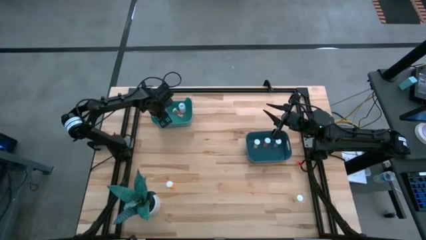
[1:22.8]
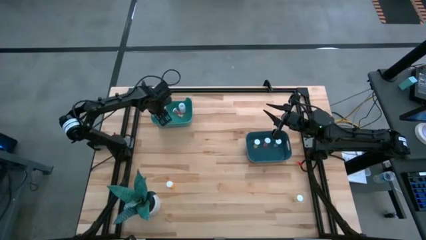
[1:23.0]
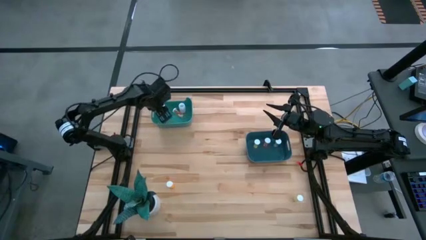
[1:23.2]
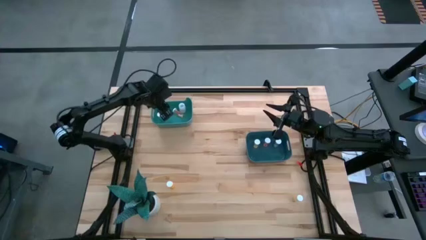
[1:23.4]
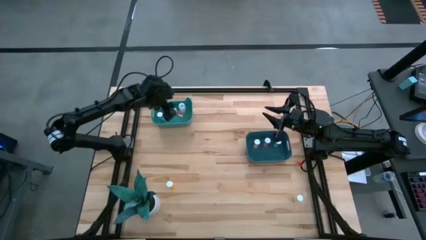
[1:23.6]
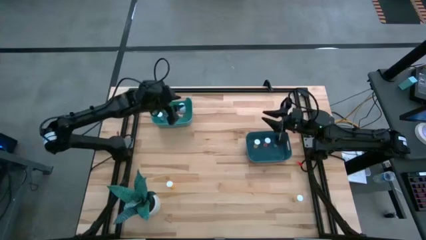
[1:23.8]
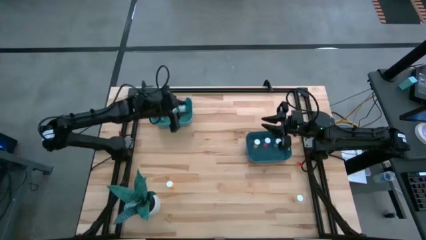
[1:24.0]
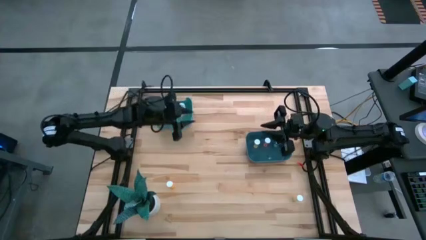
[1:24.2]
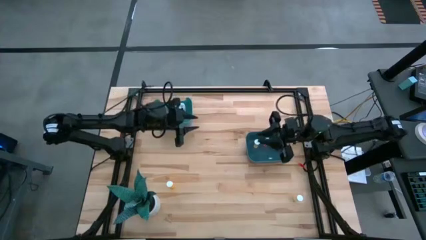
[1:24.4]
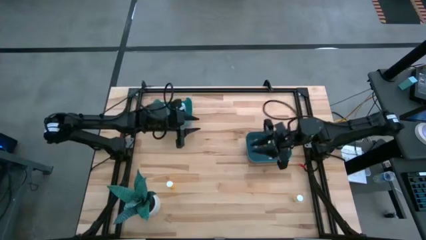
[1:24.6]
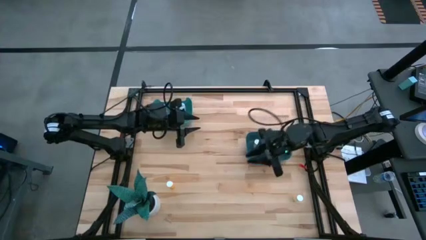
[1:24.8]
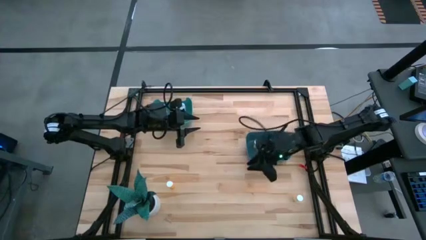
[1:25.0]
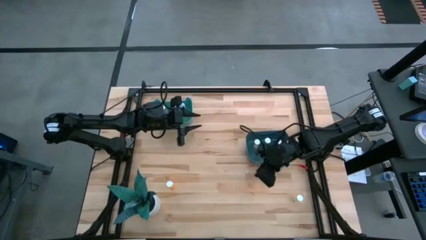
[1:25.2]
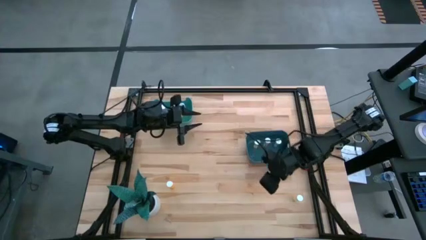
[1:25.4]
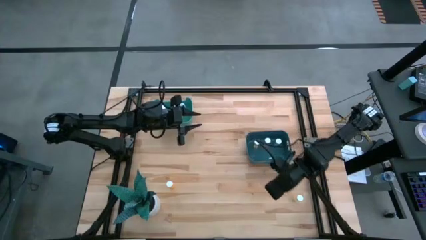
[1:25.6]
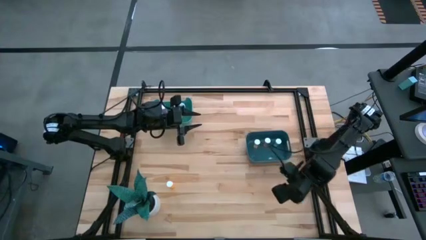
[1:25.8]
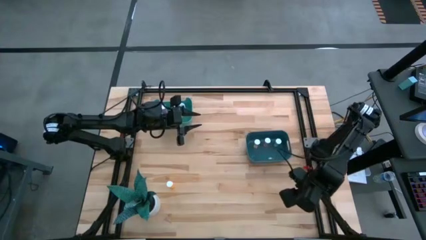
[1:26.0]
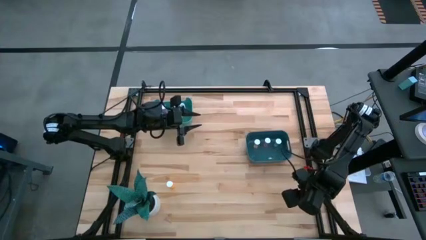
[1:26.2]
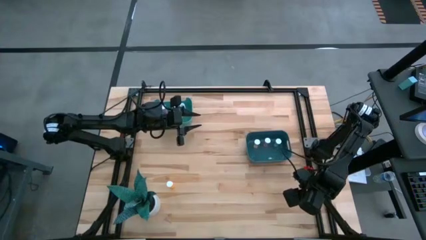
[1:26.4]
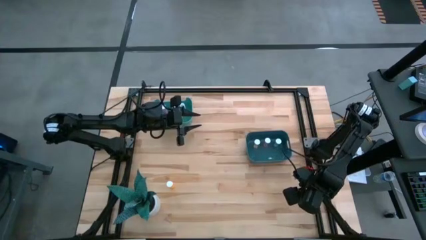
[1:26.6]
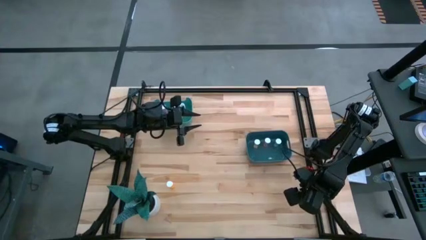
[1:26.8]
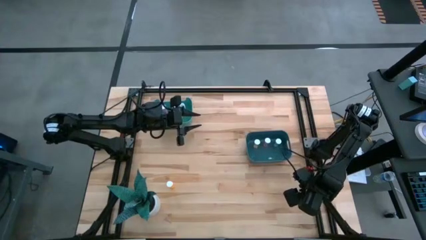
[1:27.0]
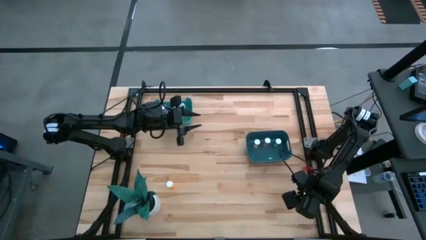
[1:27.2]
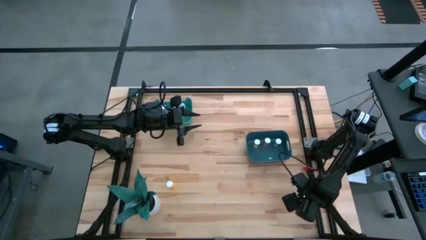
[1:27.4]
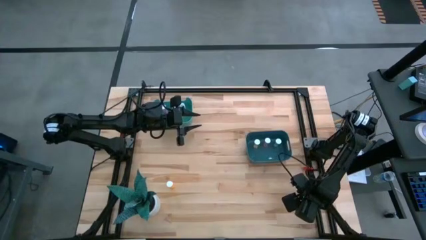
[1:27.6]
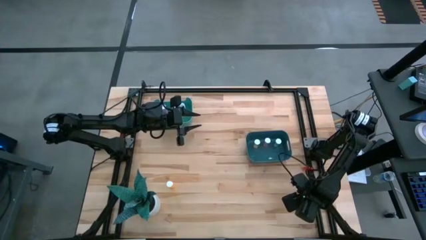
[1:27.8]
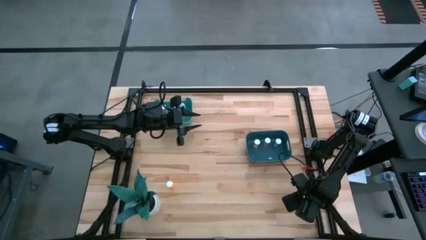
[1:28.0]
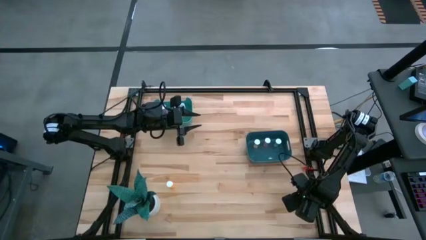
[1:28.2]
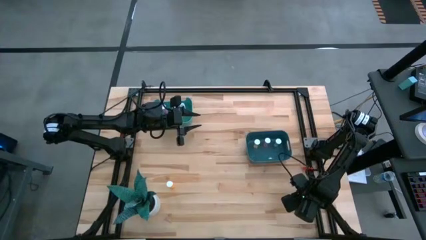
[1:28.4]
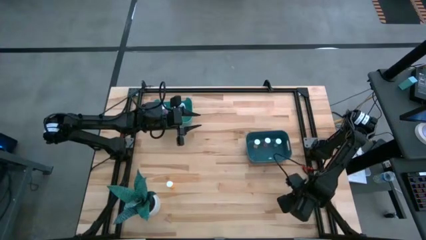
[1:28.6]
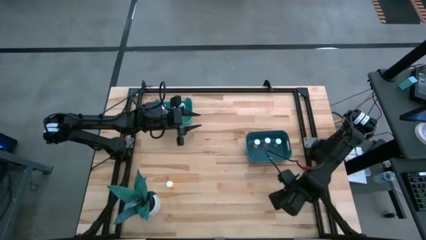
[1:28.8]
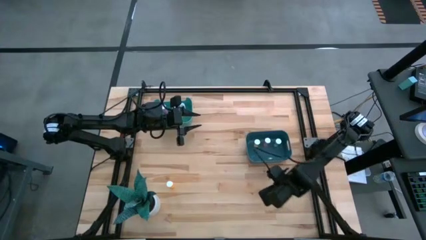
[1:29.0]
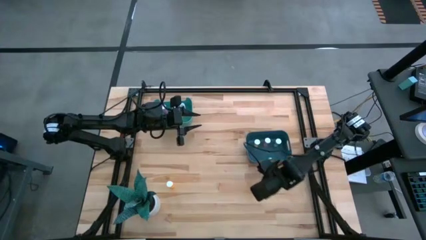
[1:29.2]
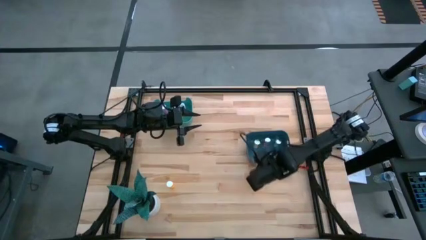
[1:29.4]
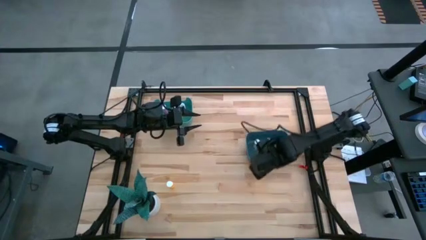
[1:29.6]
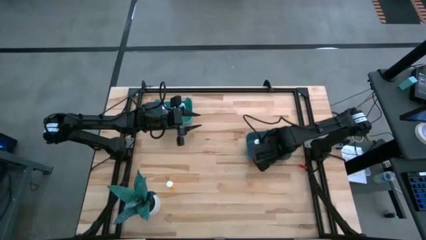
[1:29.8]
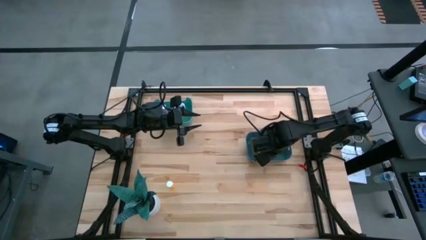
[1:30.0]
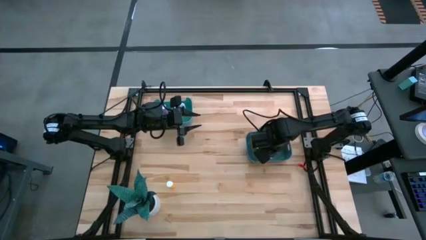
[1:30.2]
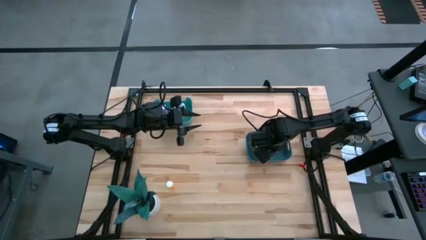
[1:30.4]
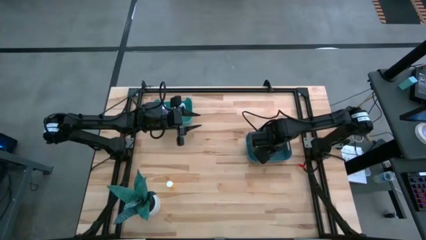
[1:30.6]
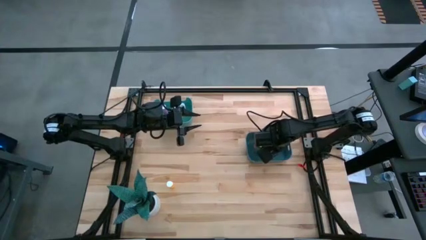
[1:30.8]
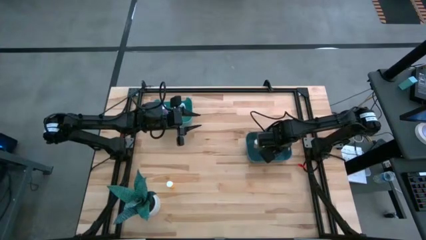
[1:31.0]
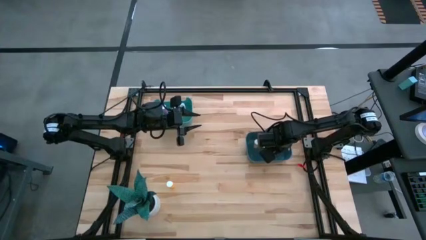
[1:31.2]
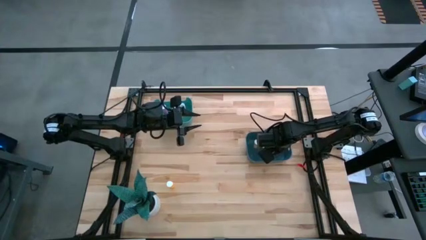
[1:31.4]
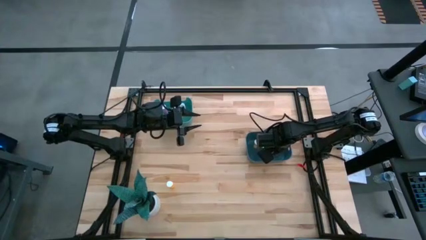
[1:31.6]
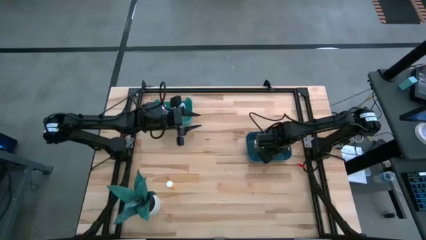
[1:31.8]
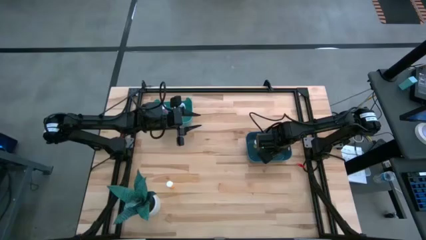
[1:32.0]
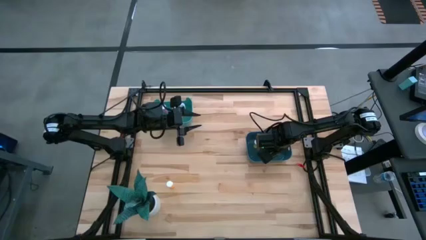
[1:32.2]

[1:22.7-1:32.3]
Task: Pick and place medicine bottles into bin by pill shape (circle, oval)
Put the yellow tablet bottle into the blue bin

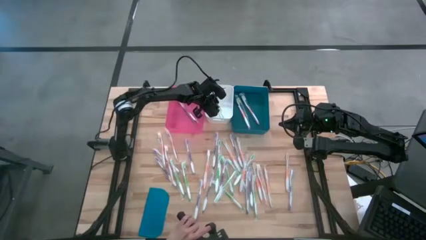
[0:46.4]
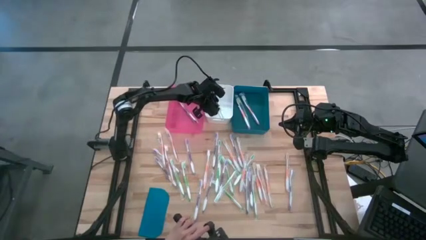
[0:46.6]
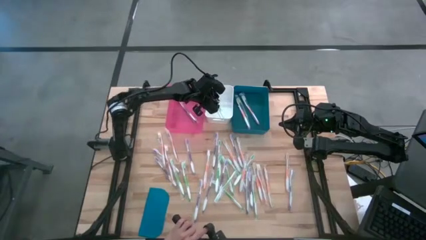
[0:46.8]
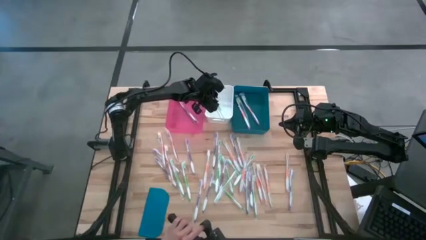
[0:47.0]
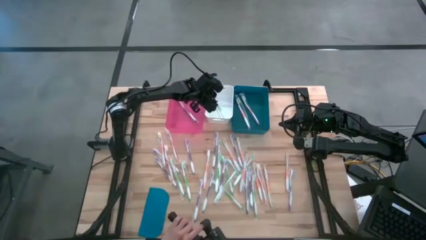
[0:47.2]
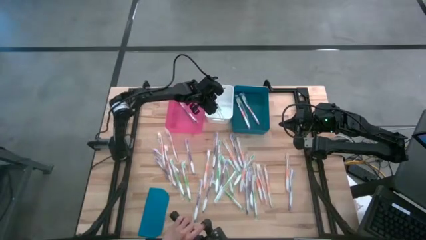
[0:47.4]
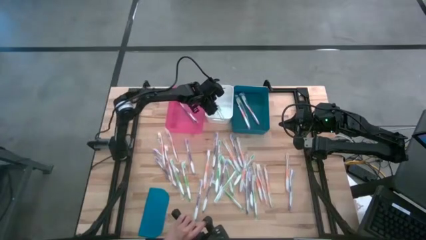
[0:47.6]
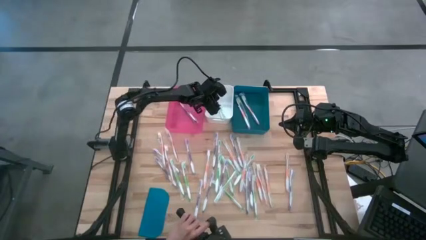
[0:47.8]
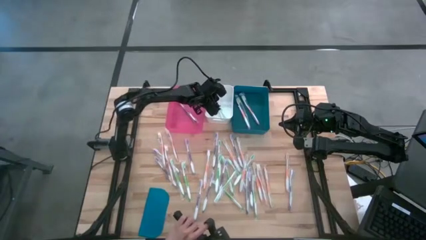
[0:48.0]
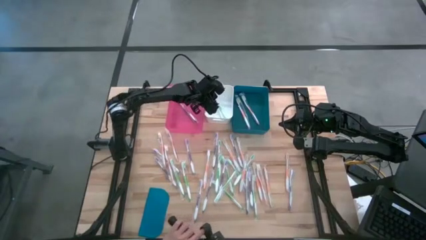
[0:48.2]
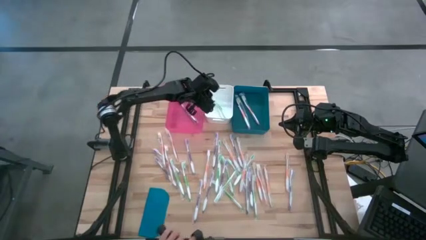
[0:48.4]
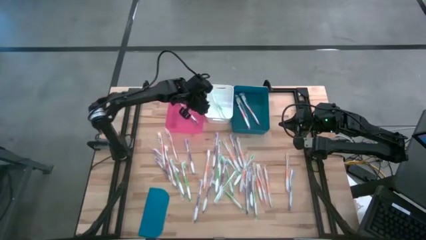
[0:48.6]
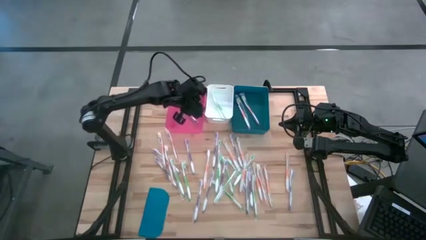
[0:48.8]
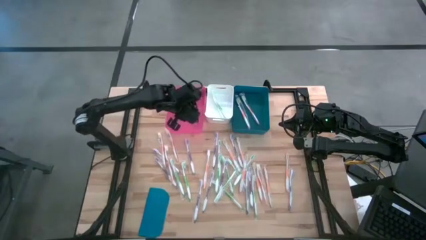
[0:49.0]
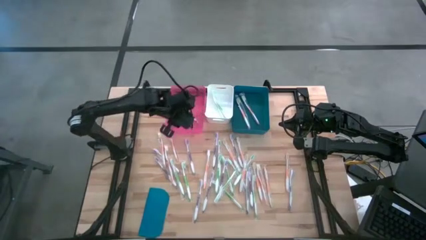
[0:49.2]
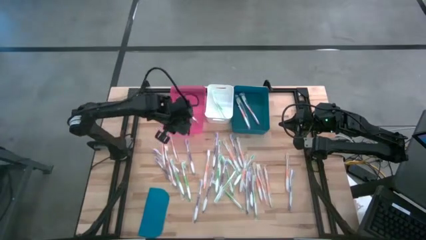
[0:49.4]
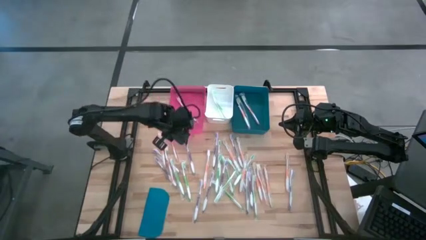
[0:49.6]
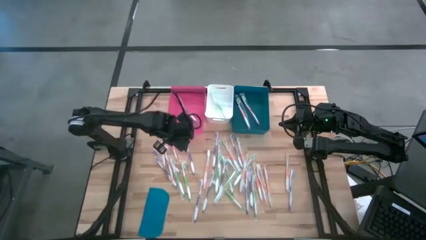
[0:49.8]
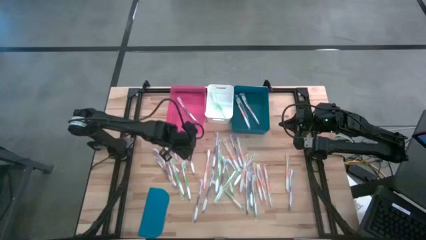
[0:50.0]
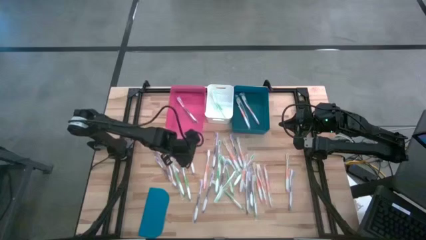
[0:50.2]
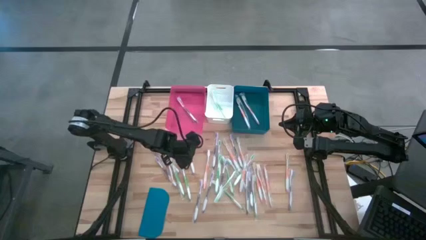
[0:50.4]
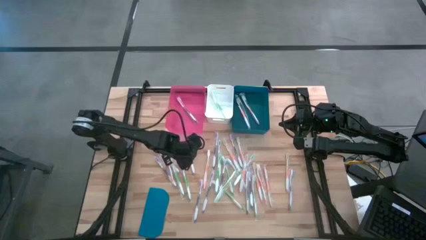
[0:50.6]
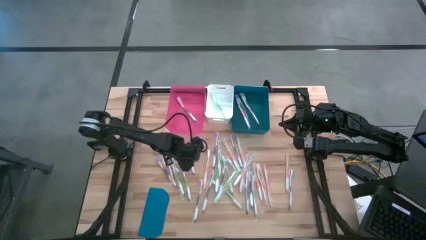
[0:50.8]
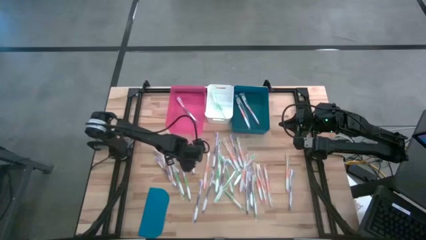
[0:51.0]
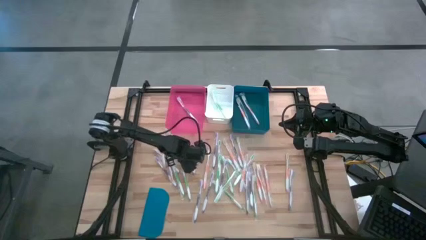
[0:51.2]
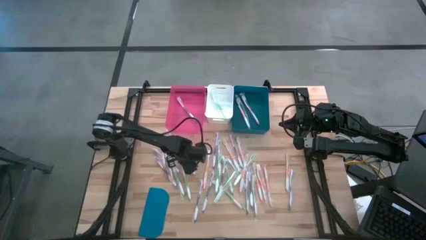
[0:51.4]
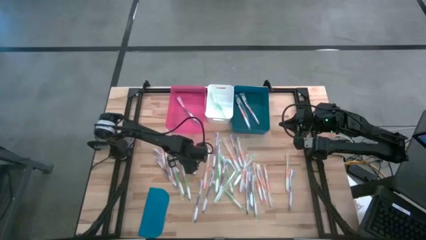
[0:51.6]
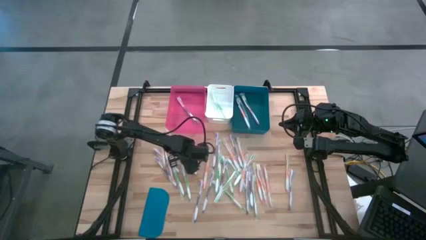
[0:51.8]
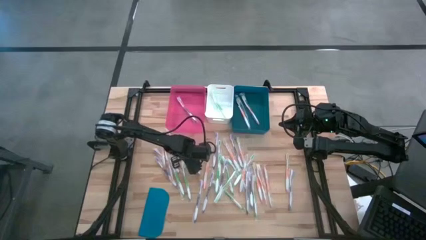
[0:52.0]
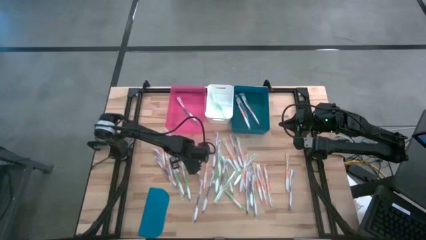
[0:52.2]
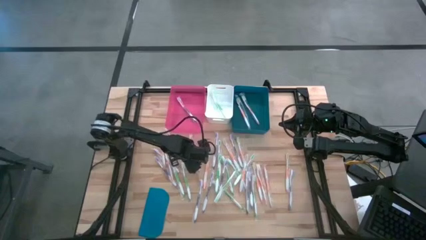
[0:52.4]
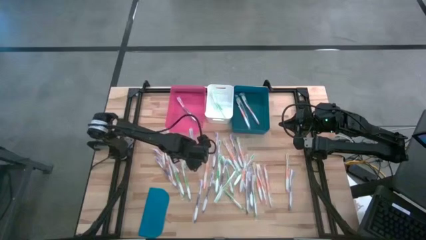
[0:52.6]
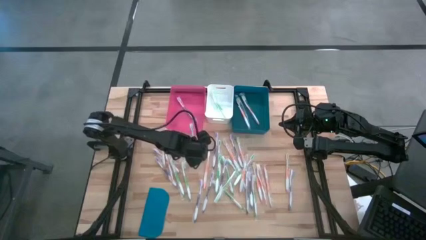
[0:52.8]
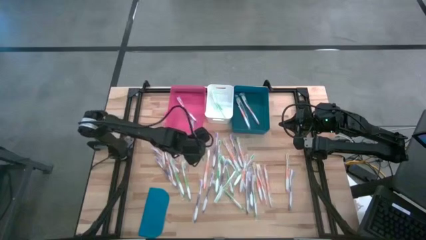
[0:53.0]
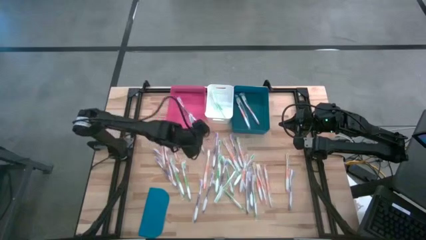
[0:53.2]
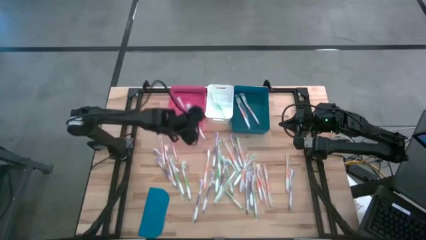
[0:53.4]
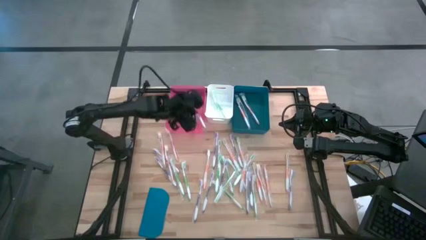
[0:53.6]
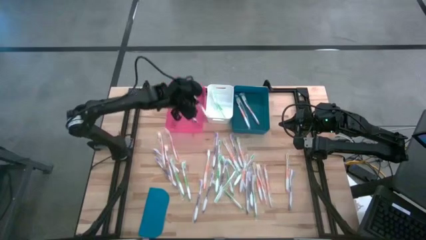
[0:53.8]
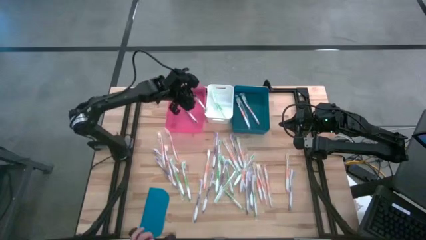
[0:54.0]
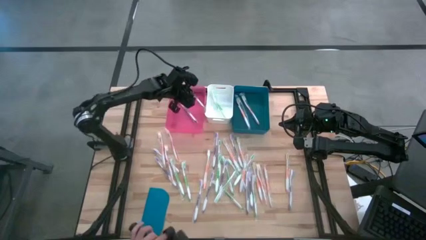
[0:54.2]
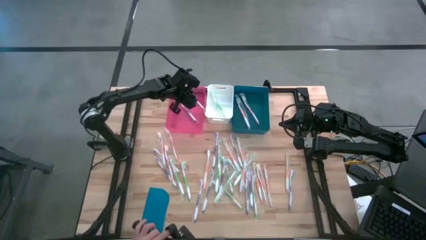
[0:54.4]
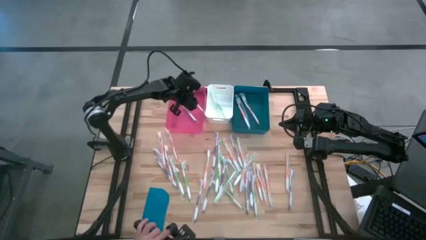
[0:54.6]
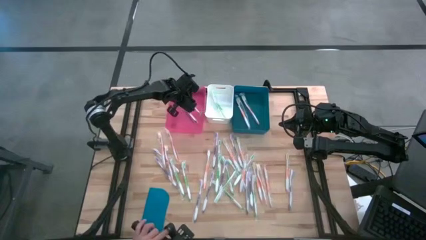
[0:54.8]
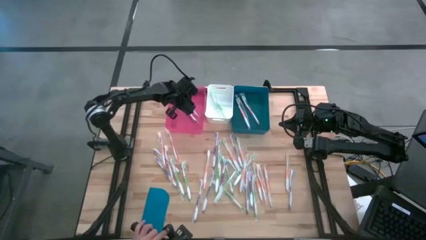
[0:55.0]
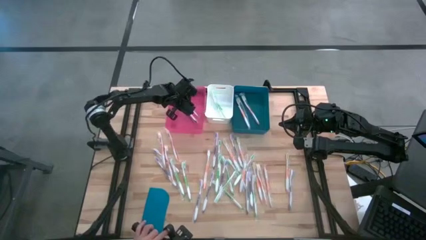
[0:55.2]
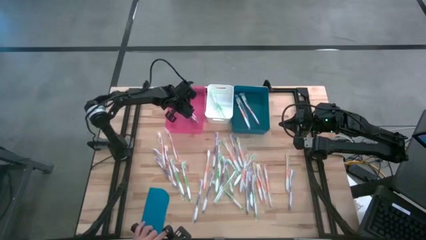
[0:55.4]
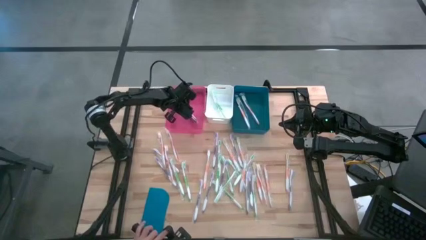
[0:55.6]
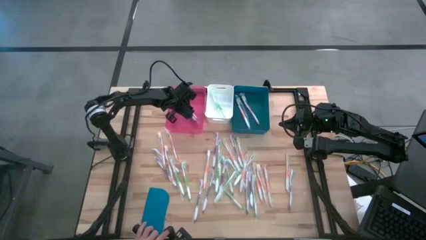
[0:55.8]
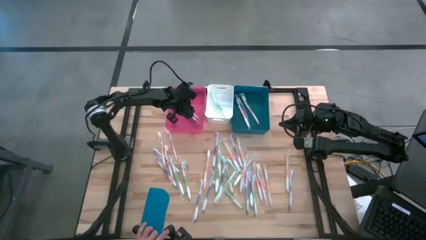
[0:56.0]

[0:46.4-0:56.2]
Task: Pick & Place Toothbrushes
Put the violet toothbrush into the pink bin
